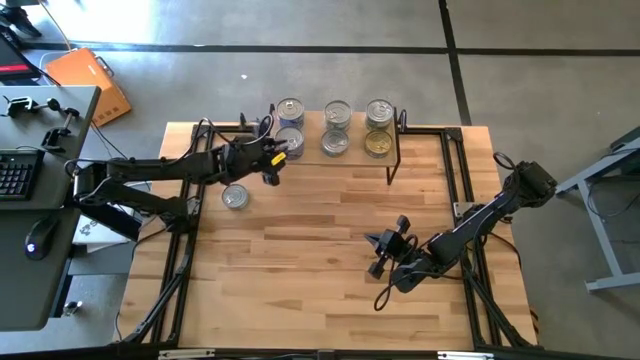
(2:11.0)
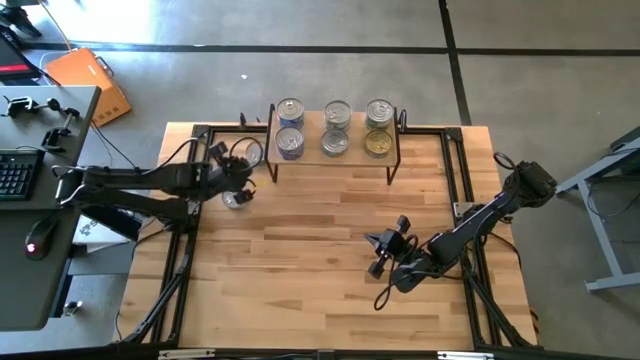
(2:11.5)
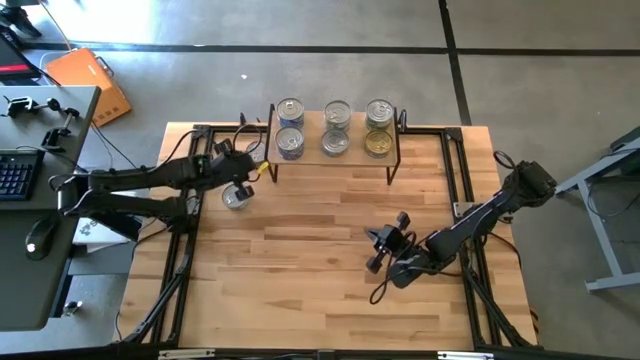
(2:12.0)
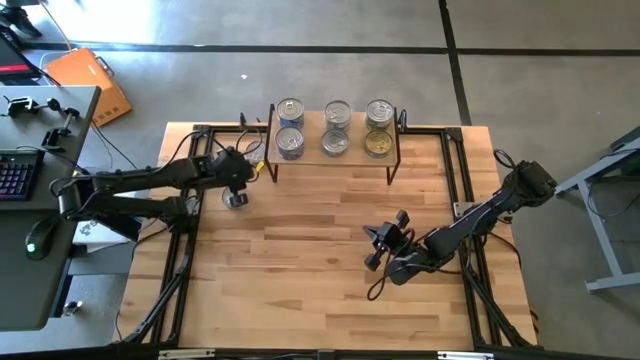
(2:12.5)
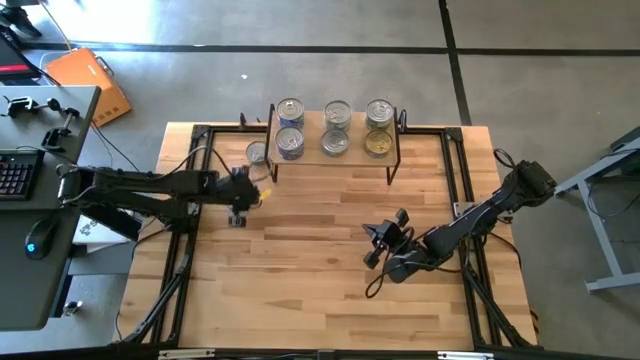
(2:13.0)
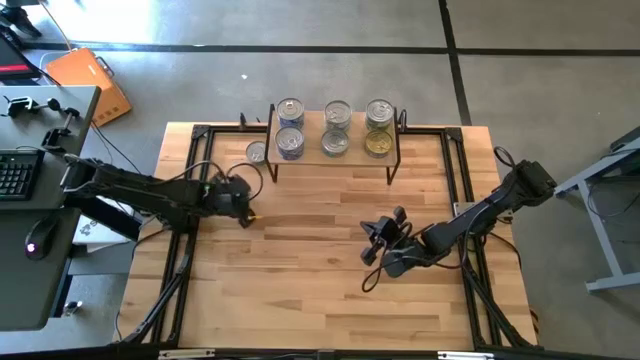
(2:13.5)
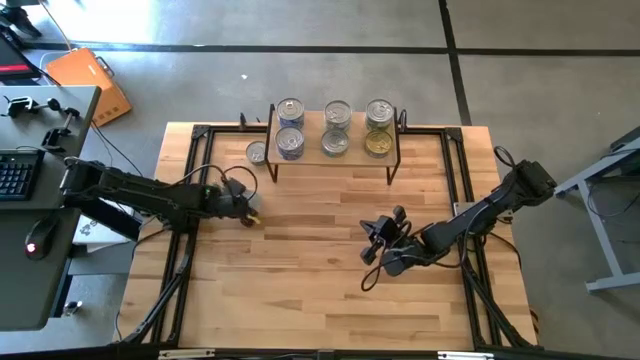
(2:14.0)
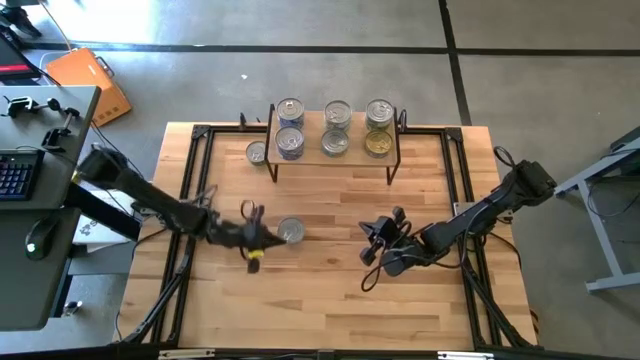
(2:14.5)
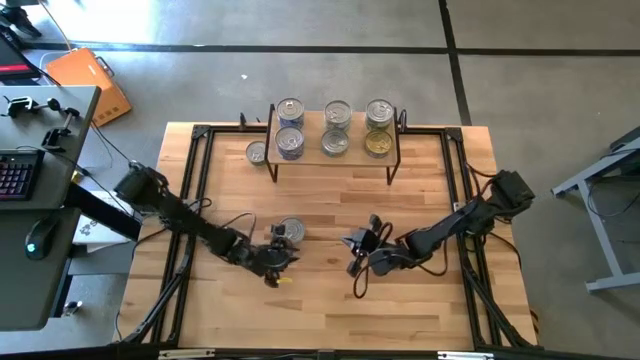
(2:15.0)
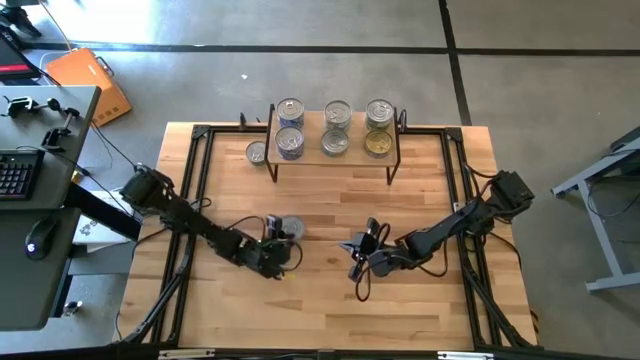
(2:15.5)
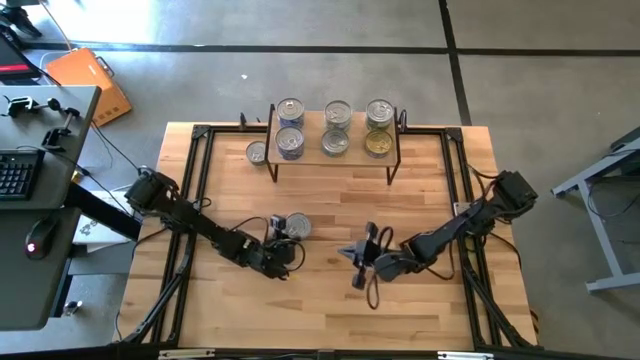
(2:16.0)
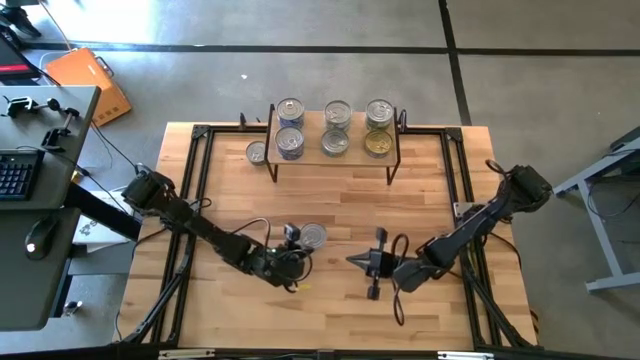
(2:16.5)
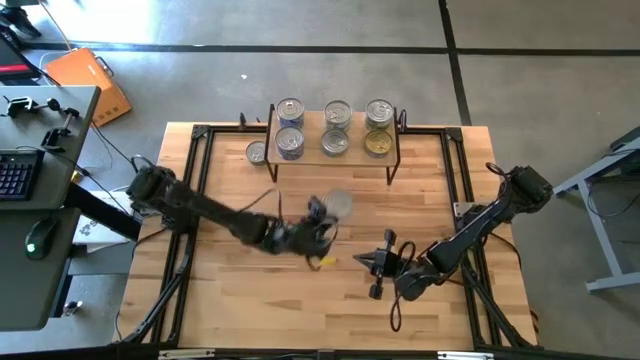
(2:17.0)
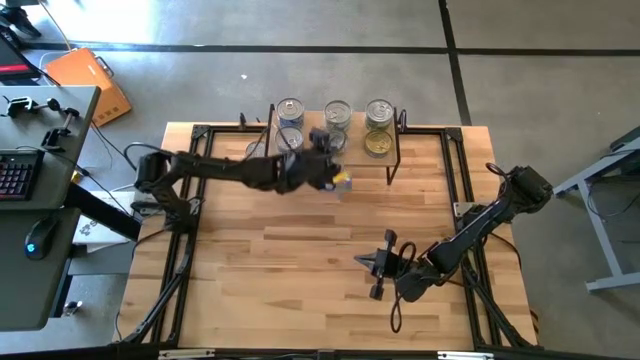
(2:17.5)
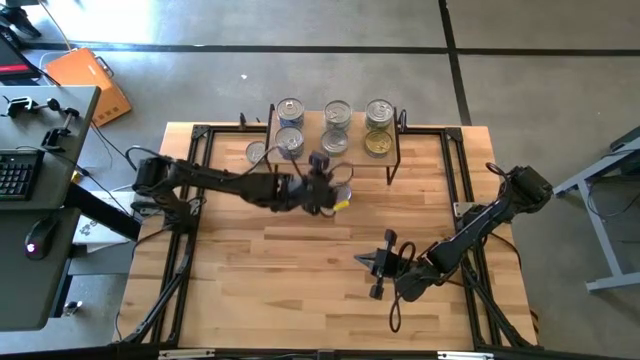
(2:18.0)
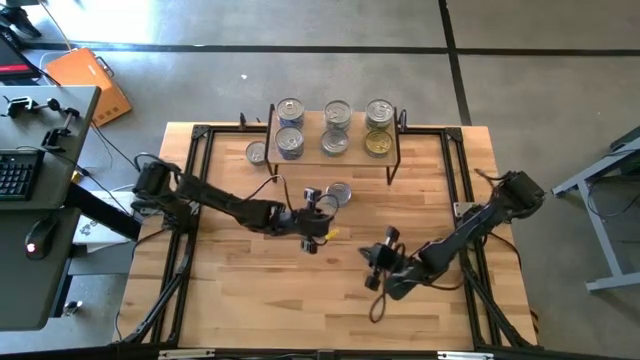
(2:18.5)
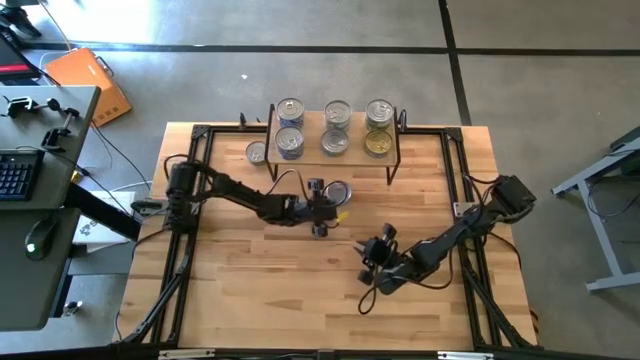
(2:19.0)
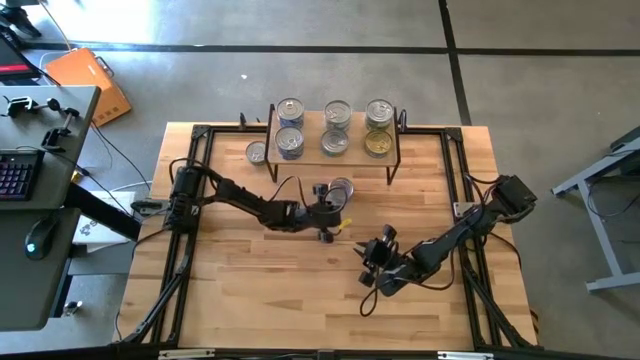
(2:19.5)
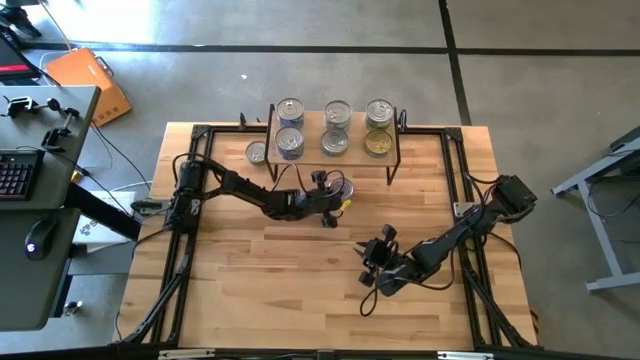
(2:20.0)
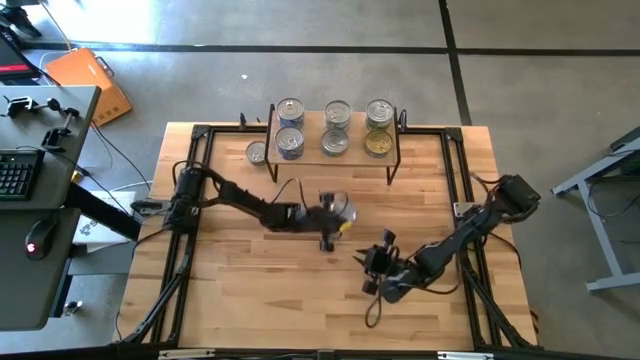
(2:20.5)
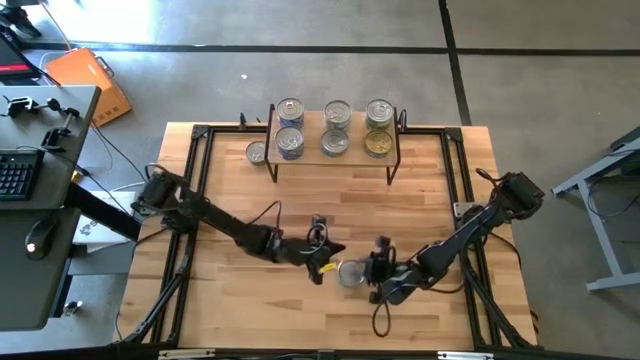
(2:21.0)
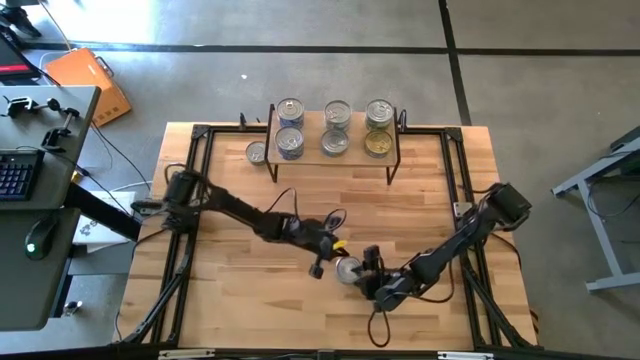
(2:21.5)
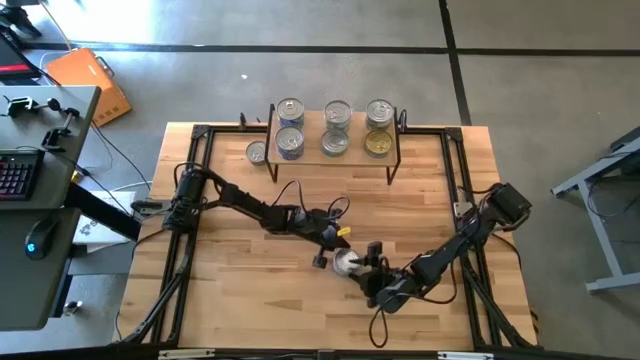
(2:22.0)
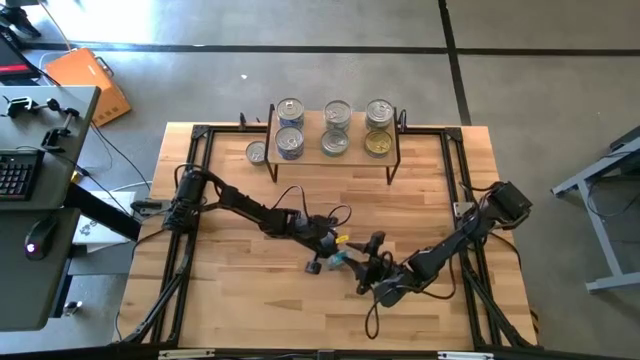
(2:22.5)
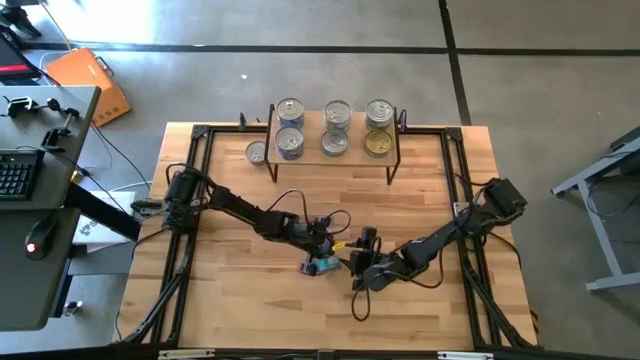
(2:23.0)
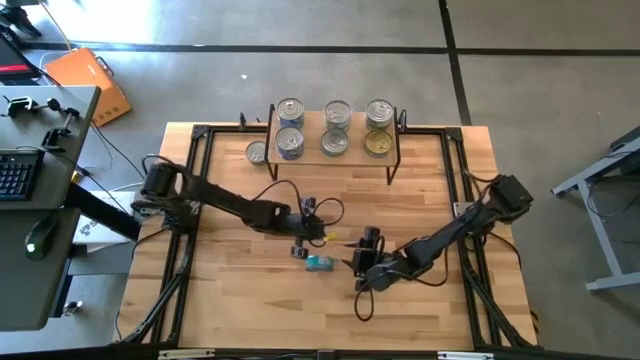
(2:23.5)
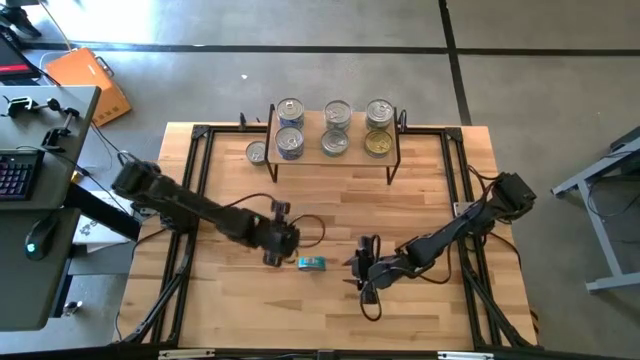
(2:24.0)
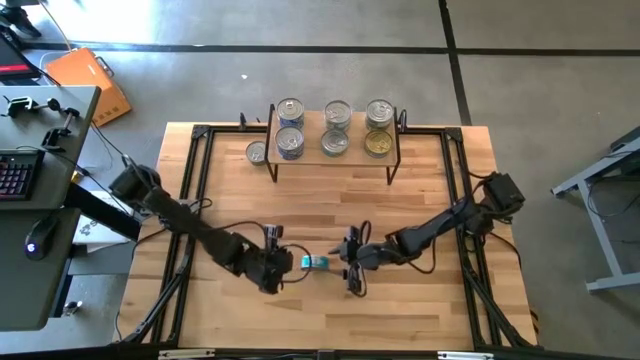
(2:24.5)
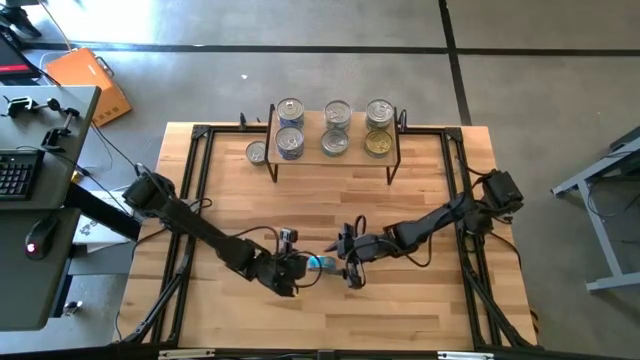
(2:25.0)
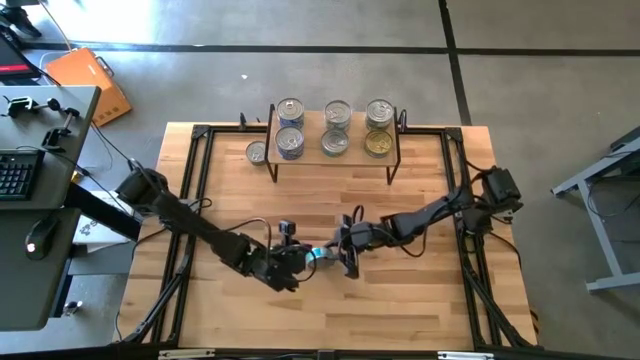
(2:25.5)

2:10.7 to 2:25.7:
Task: Stack canned seafood by type on shelf
Stack the yellow-blue tuna can on top of the other yellow-blue tuna can on the shelf

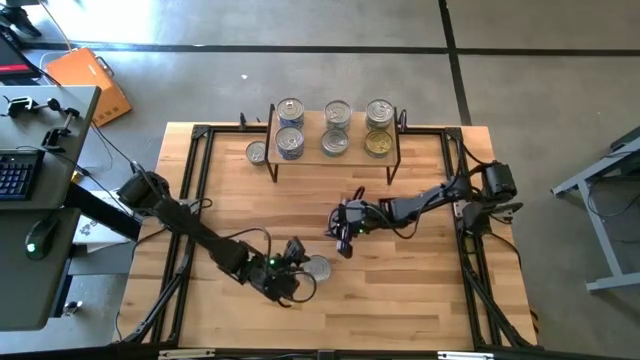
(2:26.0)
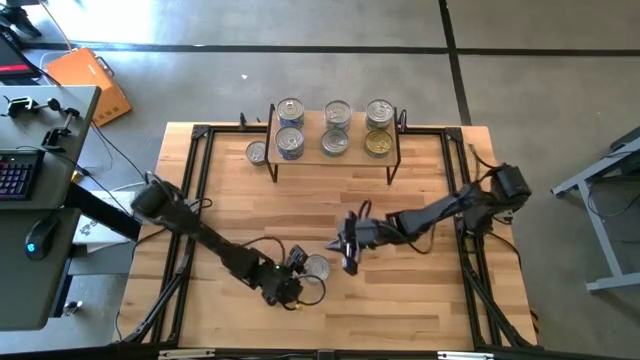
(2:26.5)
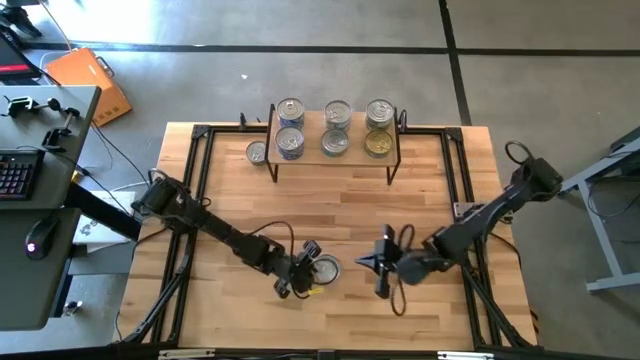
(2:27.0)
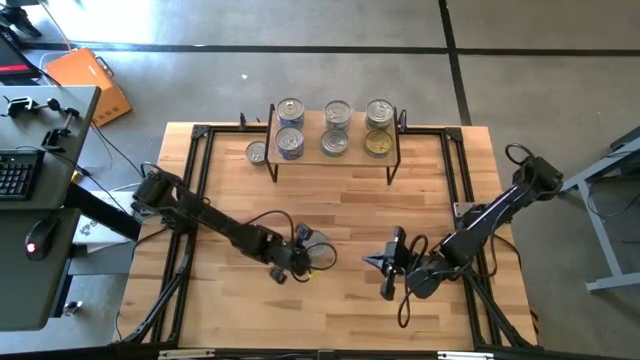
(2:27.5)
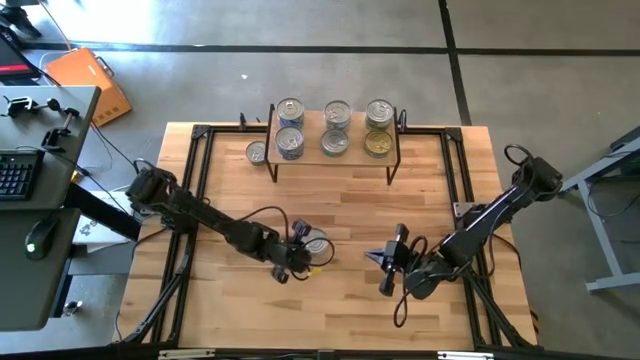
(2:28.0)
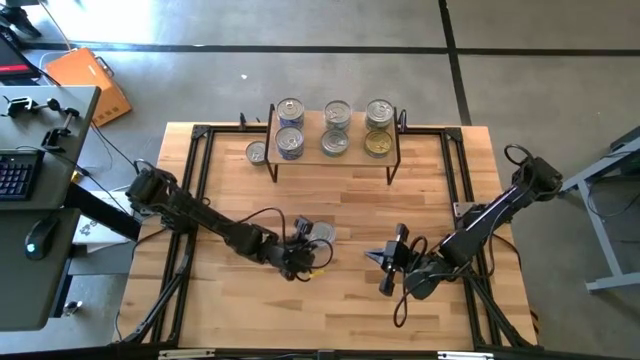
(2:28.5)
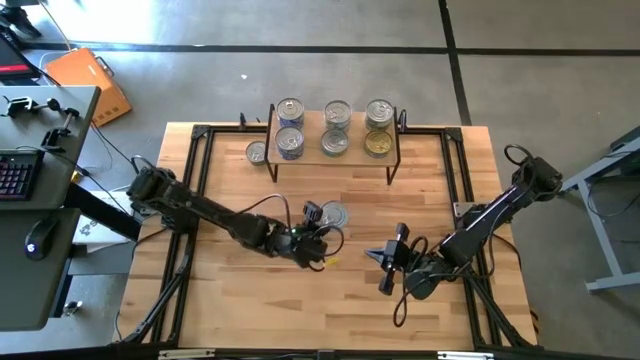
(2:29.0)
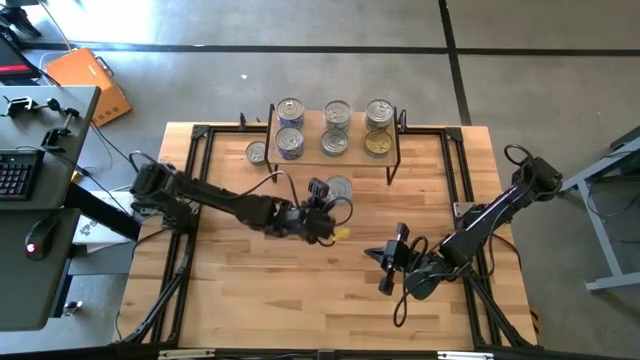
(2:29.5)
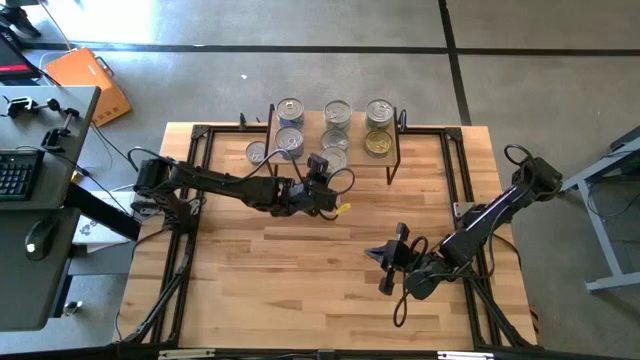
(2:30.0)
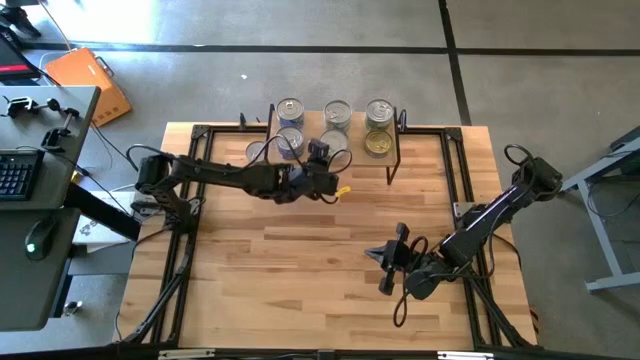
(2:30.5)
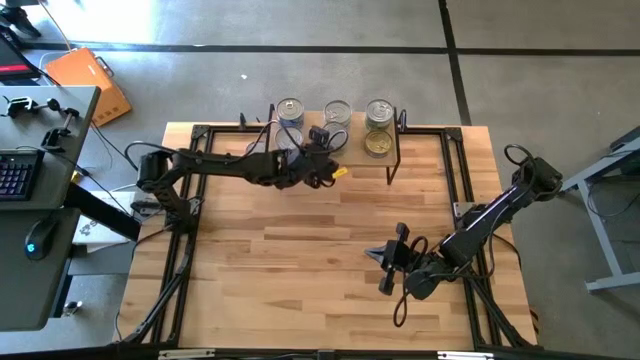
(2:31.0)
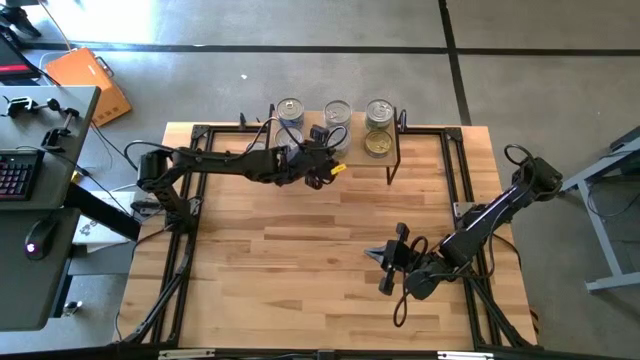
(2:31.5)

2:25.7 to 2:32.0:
Stack the yellow-blue tuna can on top of the other yellow-blue tuna can on the shelf

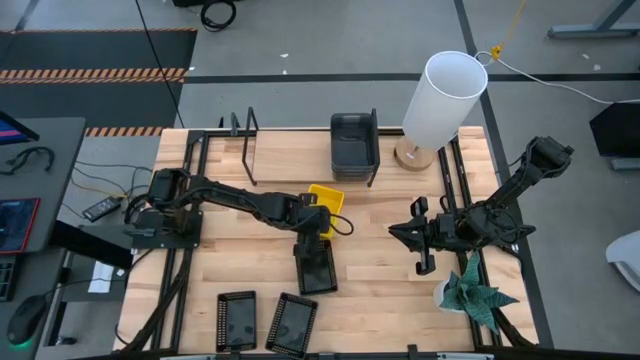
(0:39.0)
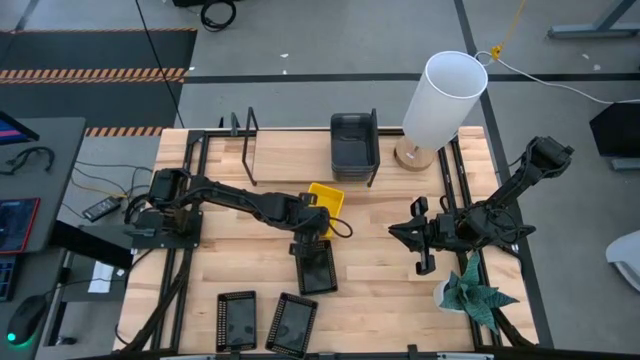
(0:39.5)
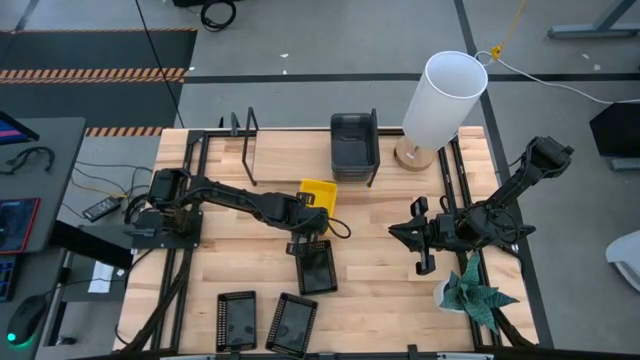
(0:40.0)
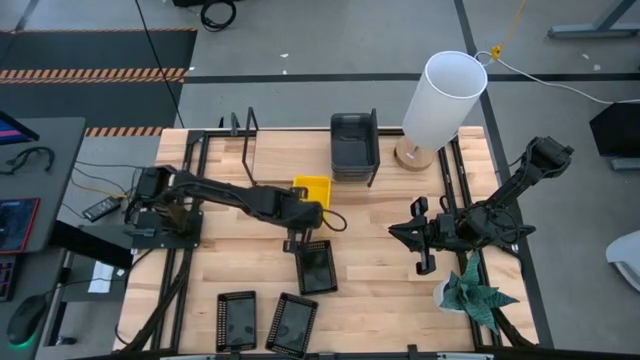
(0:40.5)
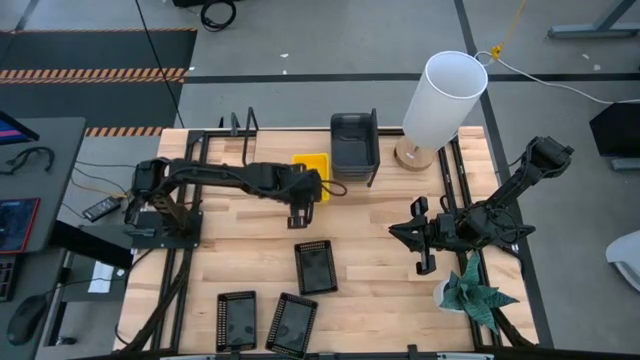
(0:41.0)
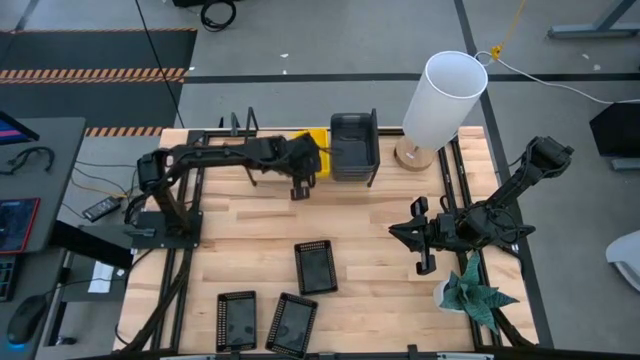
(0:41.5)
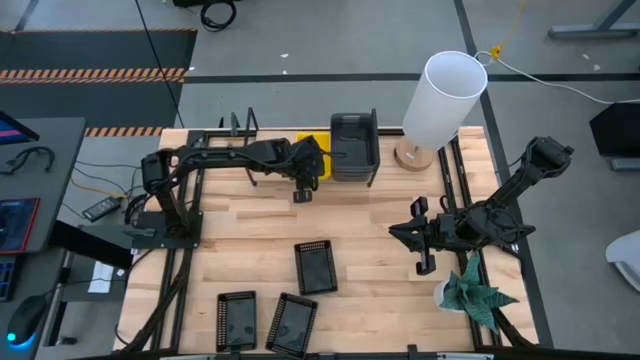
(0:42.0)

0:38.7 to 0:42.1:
Task: Stack baskets on shelf by color
Put the stacked yellow bins on the shelf
